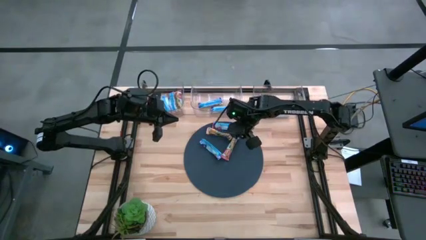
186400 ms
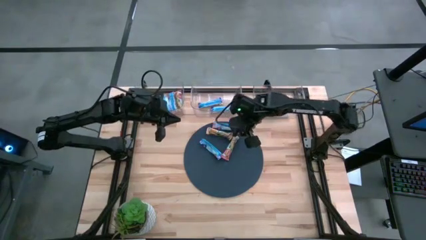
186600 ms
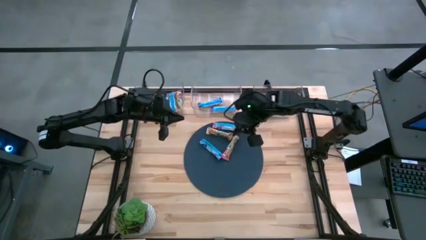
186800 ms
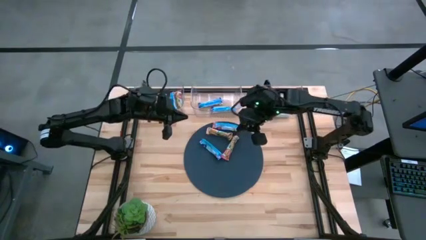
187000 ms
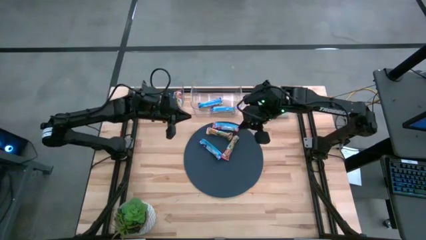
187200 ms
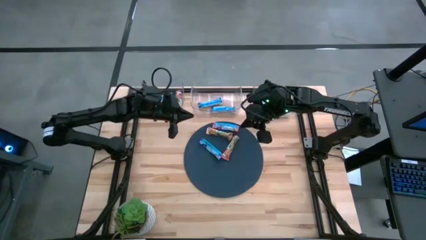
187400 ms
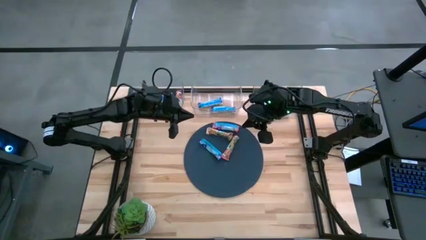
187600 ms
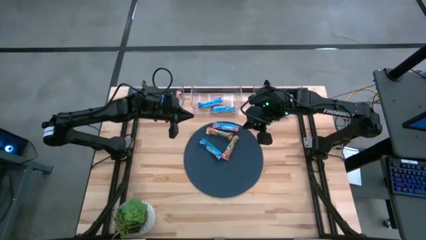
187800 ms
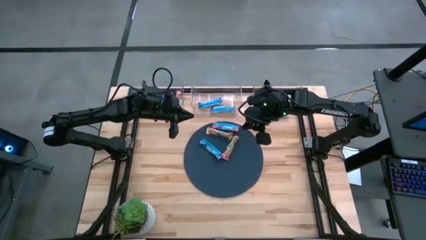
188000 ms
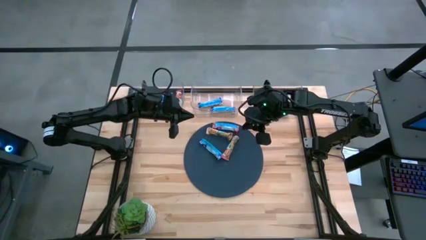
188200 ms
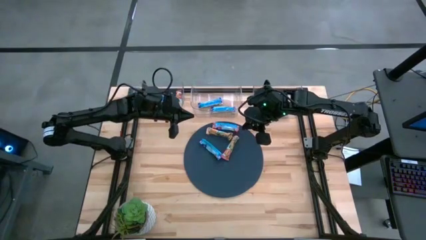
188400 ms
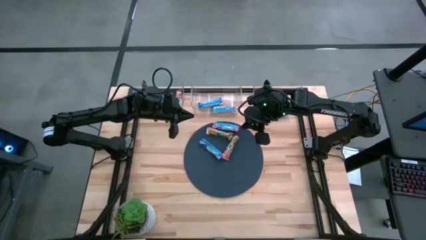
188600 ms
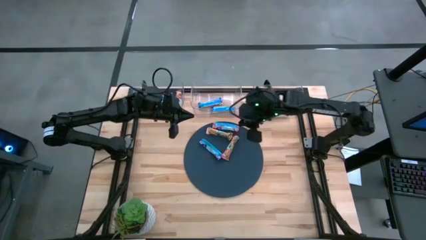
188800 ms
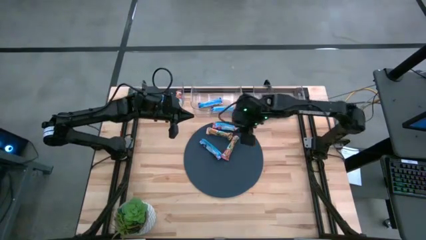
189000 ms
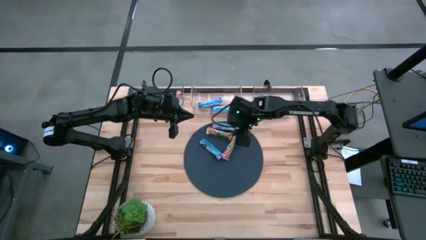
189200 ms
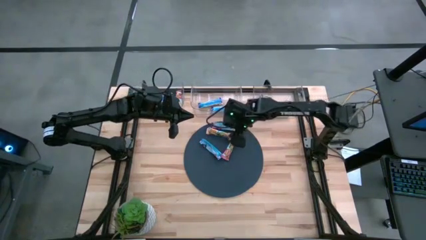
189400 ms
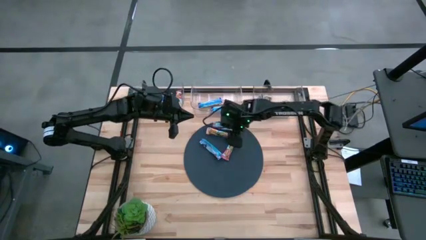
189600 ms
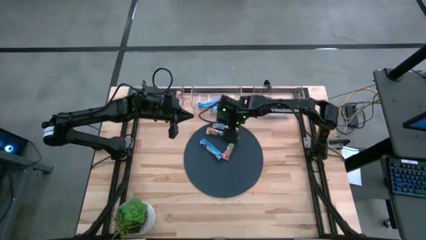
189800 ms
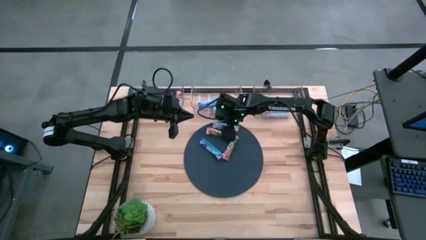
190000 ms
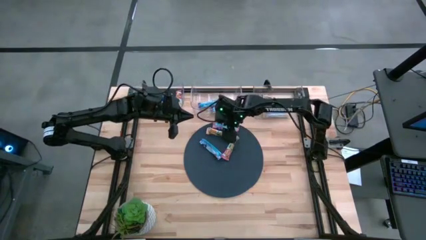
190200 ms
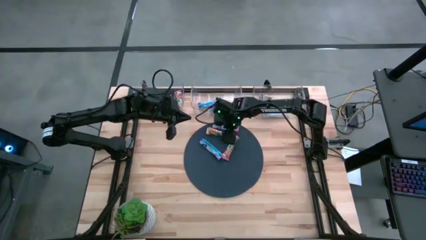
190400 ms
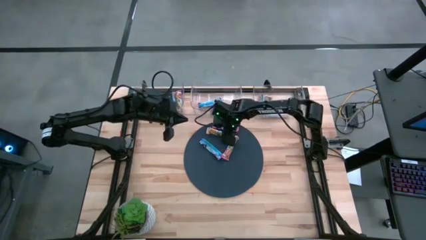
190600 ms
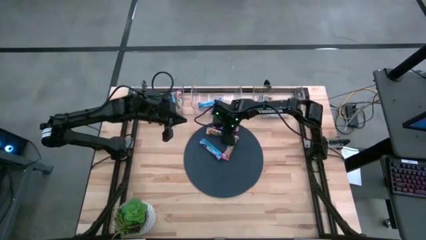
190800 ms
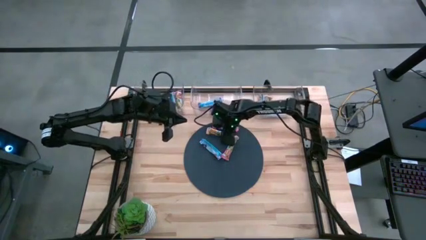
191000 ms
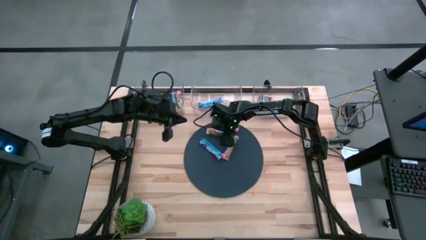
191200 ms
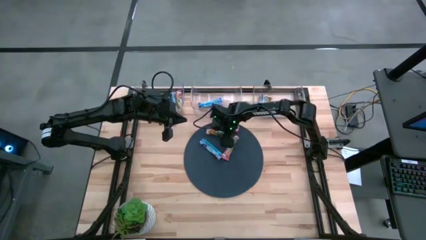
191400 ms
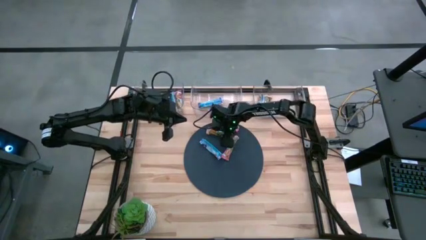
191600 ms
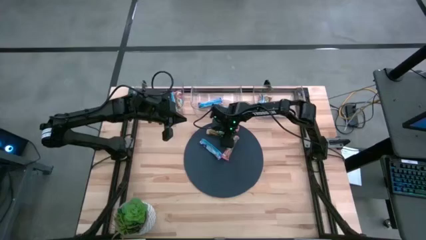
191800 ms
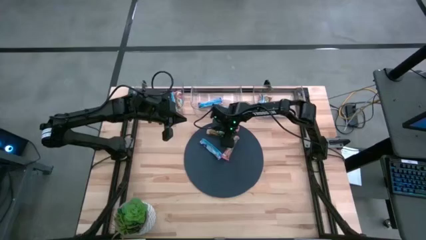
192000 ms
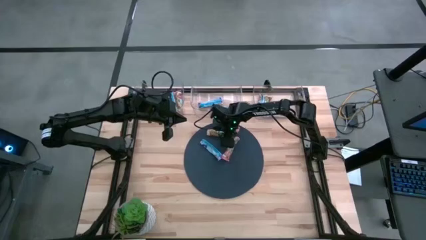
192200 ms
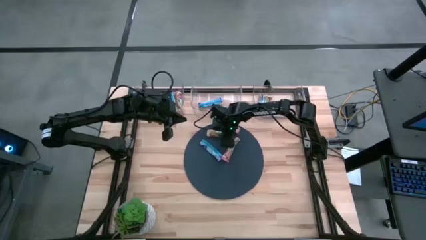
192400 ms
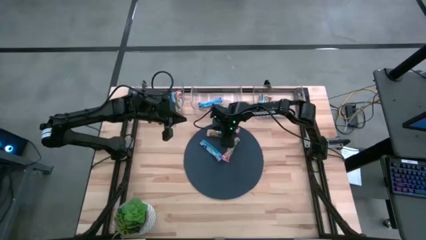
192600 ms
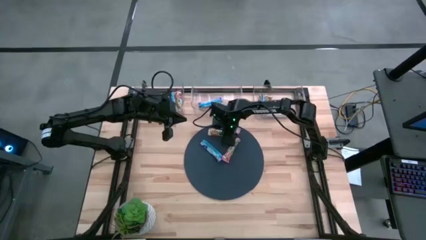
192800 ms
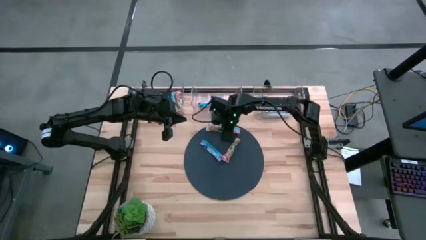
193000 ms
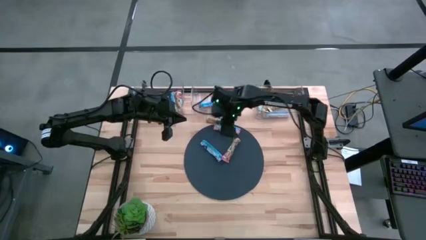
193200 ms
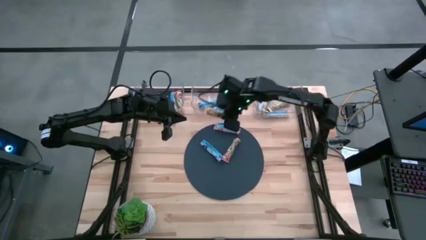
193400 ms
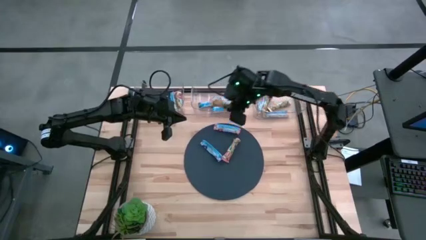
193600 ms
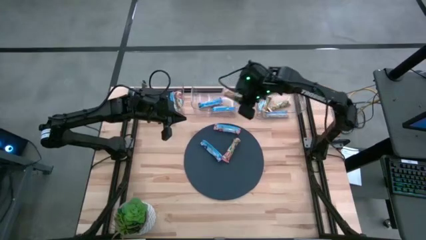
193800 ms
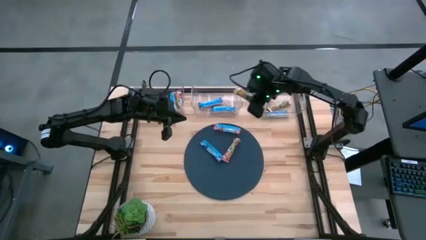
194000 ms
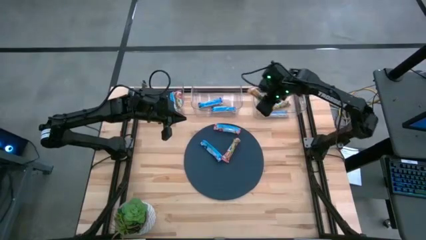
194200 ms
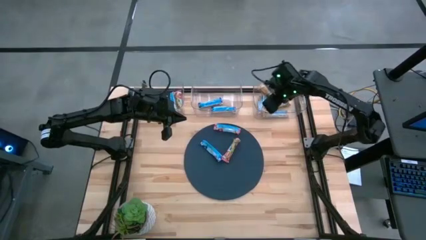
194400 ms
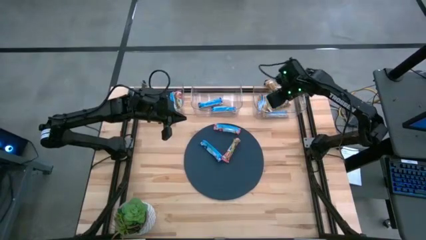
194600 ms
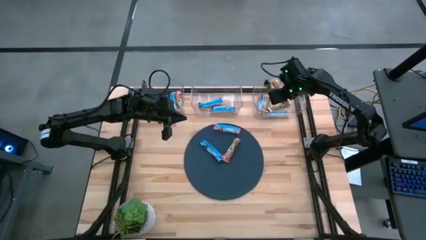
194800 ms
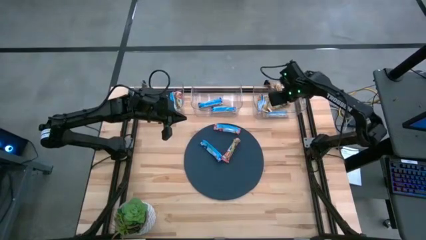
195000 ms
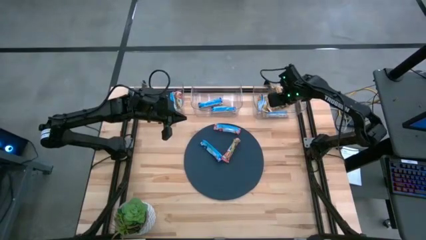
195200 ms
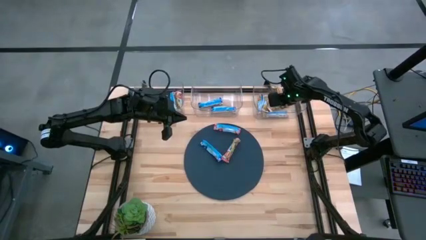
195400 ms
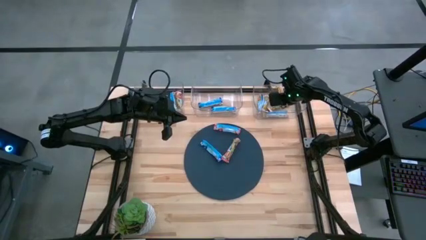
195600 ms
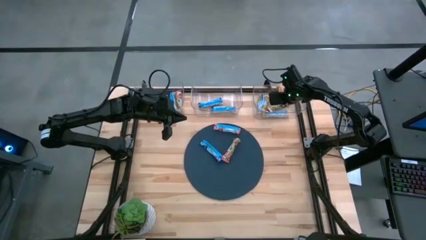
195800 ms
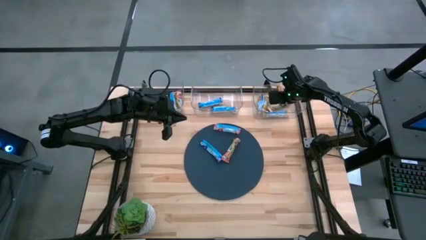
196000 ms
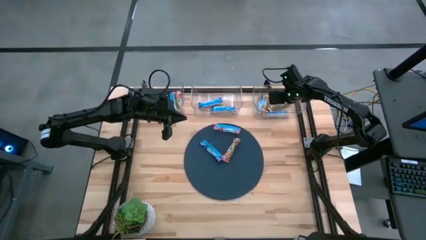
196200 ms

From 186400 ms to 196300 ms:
Task: Pick and place Granola Bars by type
Put the yellow granola bar into the right transparent bin

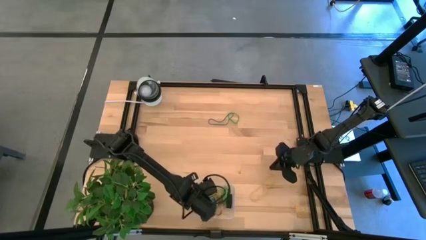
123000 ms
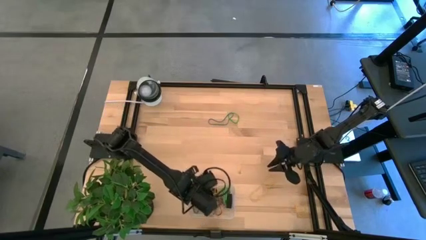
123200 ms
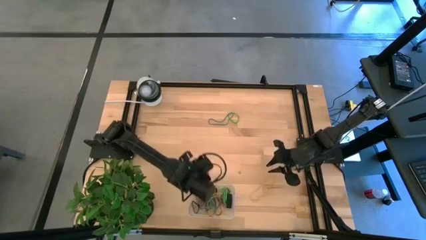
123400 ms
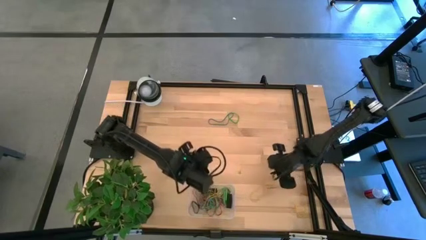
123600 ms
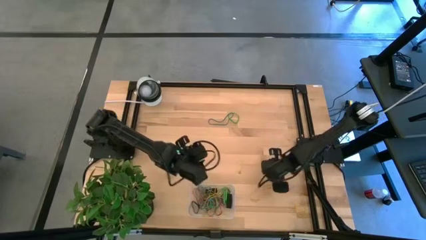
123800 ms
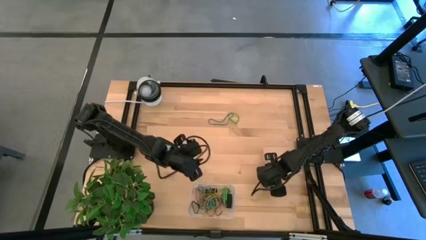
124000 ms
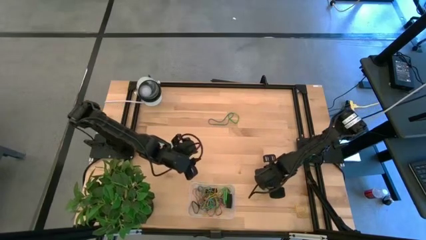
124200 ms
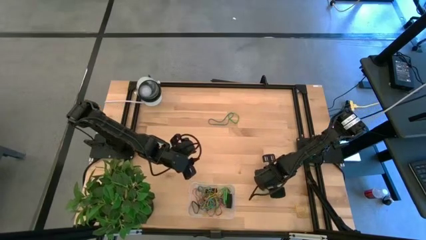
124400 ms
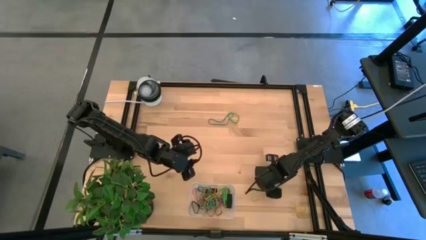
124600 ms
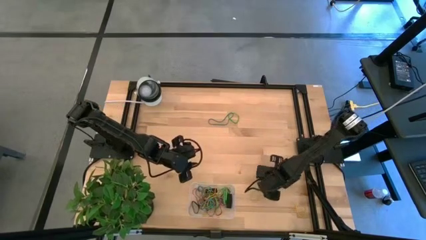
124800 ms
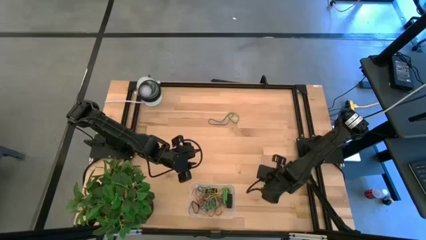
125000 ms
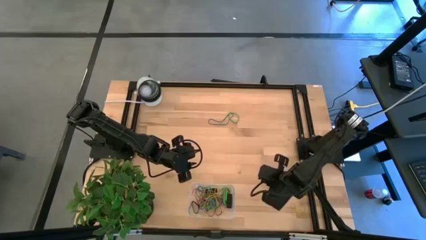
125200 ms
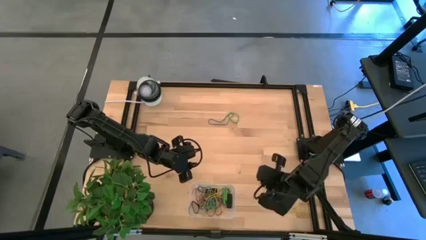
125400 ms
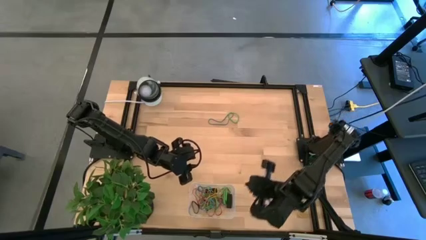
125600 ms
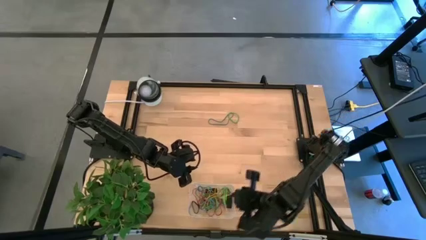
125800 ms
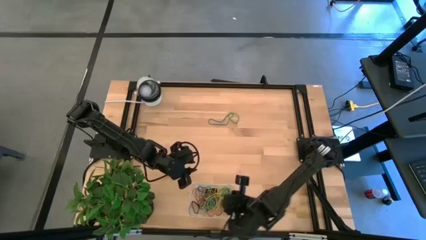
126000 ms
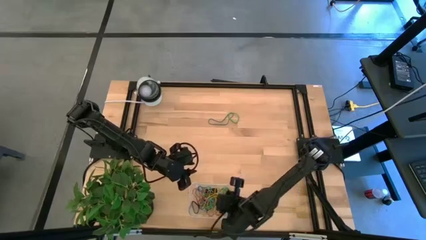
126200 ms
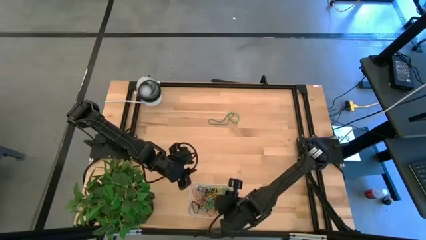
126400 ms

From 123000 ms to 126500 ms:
Task: Pick and place rubber bands into bin
Put the yellow rubber band into the transparent bin

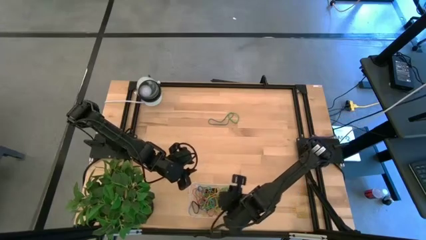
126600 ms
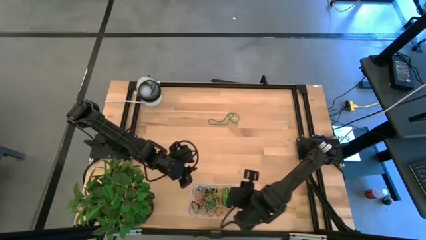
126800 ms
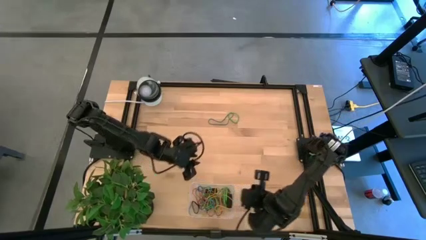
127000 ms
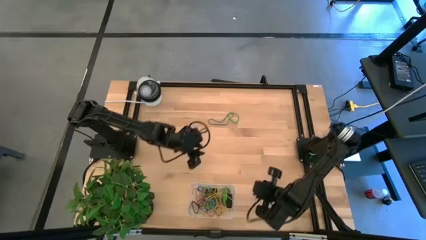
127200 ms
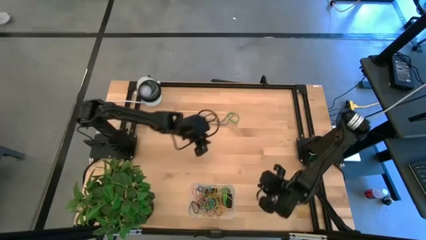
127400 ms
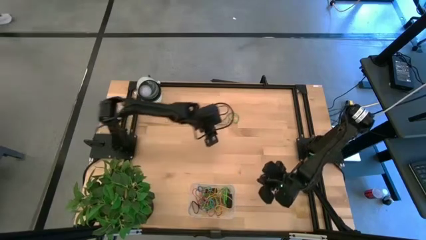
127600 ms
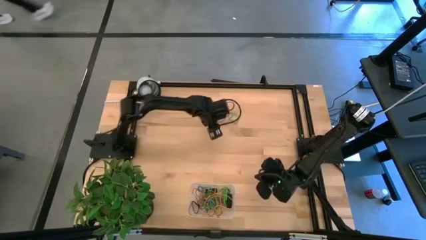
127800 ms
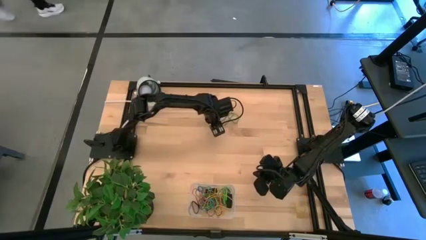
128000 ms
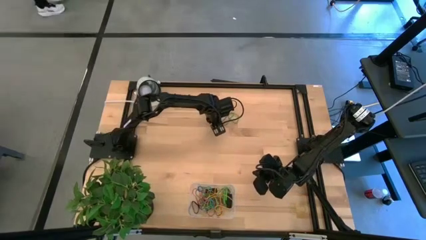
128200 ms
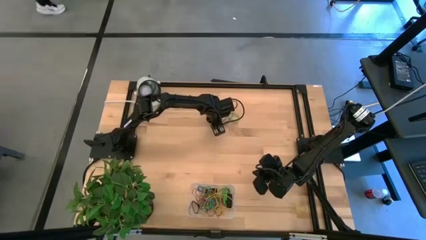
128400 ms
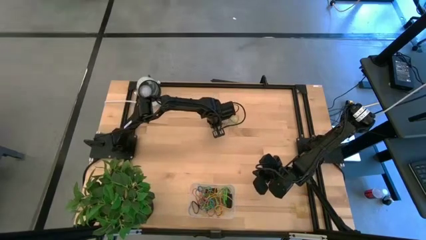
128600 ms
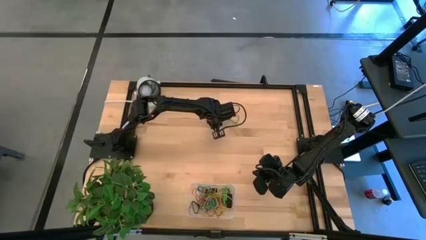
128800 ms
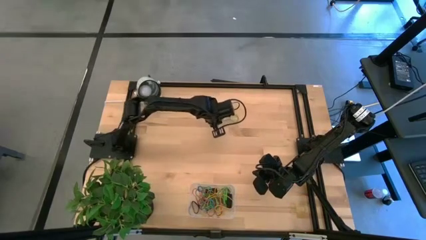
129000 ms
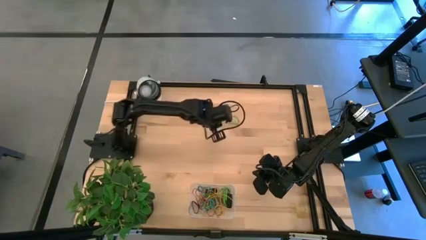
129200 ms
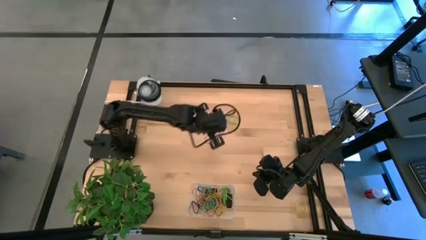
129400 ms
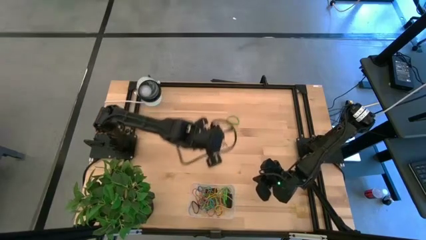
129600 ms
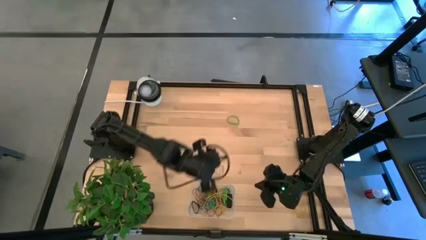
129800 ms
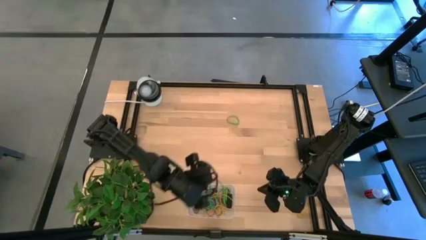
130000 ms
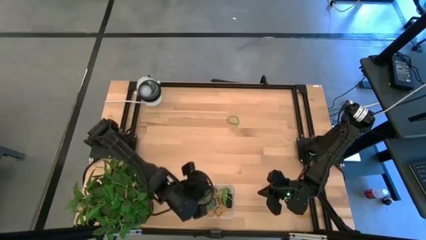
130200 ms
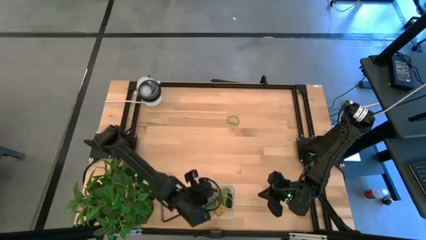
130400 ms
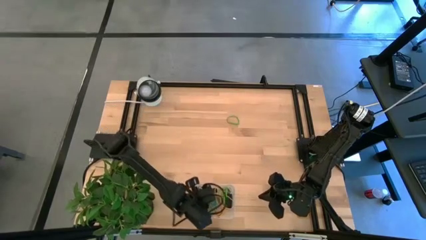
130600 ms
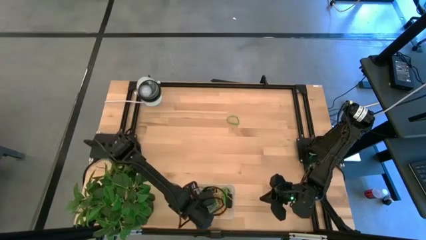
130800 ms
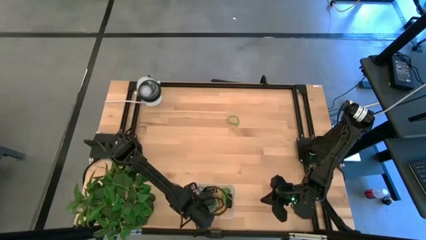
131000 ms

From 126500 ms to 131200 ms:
Put the blue rubber band into the transparent bin
